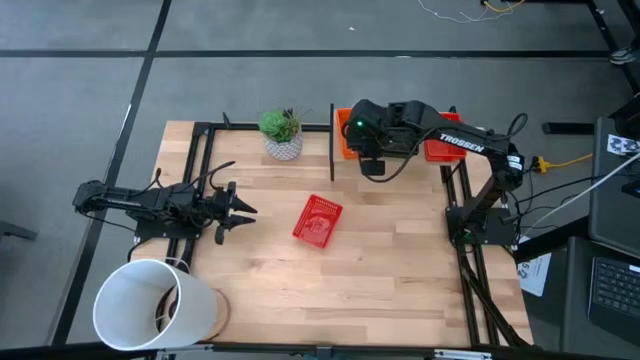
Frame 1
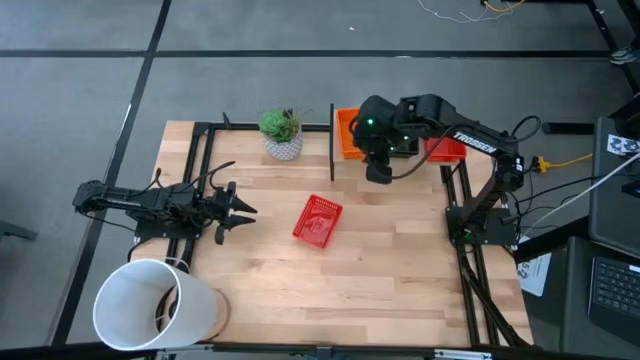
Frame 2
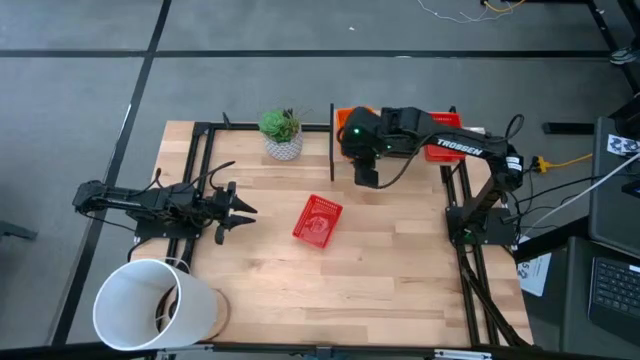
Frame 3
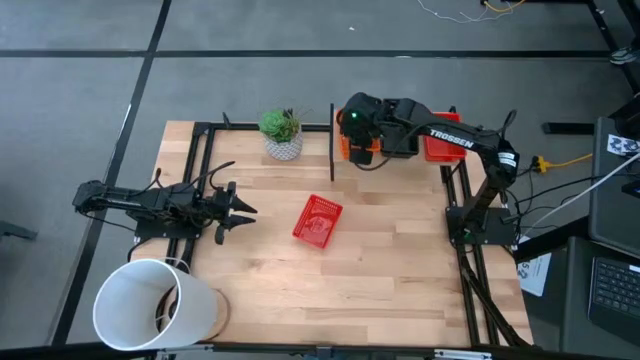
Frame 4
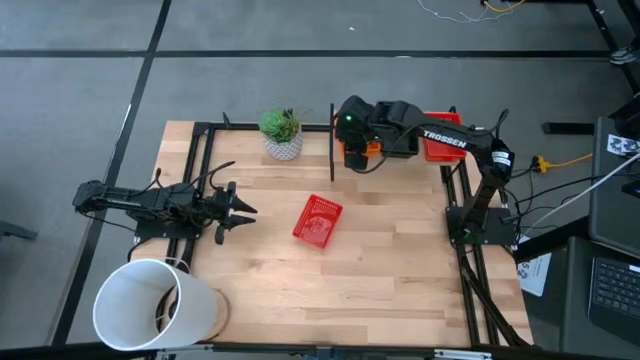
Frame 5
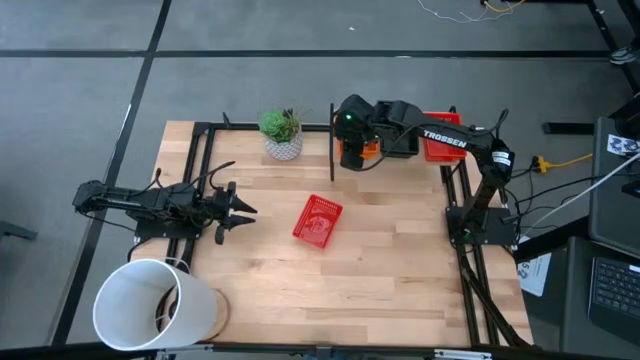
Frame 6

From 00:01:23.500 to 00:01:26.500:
Task: Stack baskets on shelf by color
Adjust the stacked orange bins on the shelf

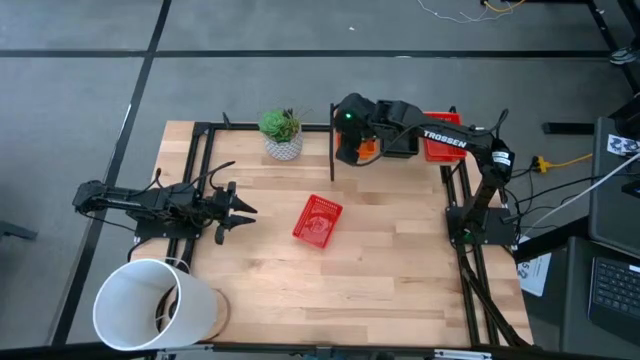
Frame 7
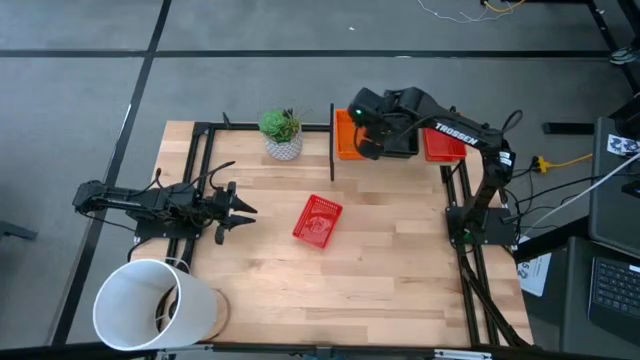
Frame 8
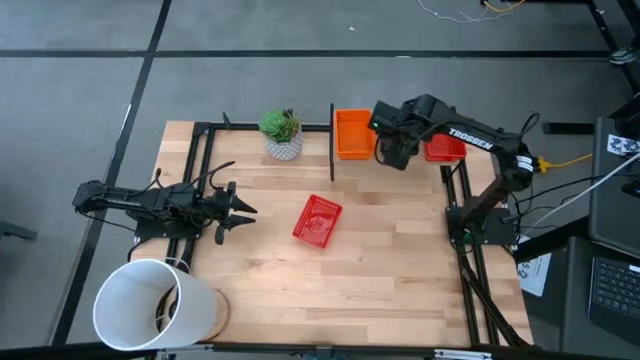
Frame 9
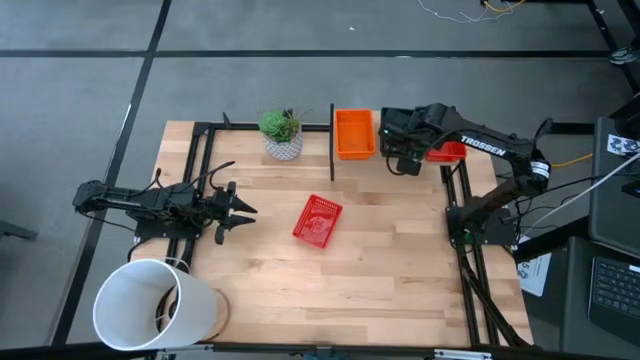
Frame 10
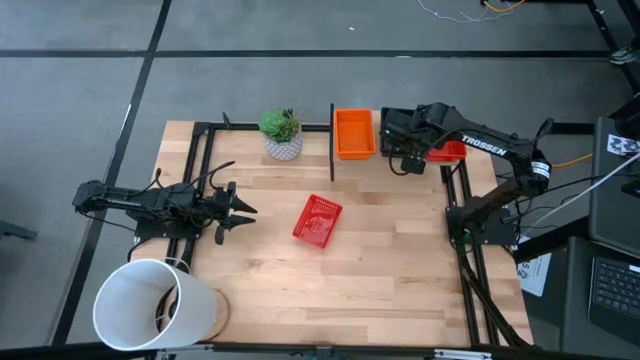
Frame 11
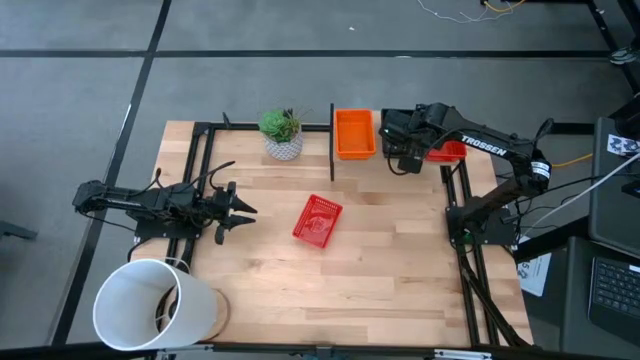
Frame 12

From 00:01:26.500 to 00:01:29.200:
Adjust the stacked black bins on the shelf

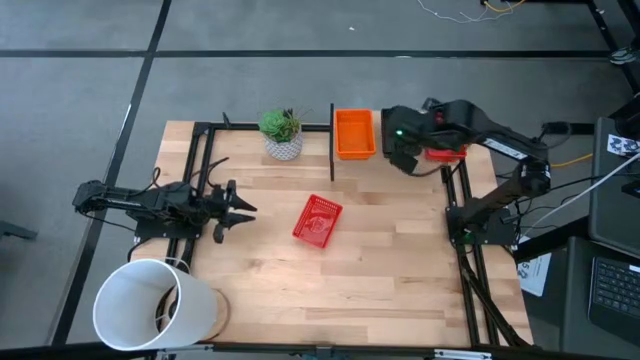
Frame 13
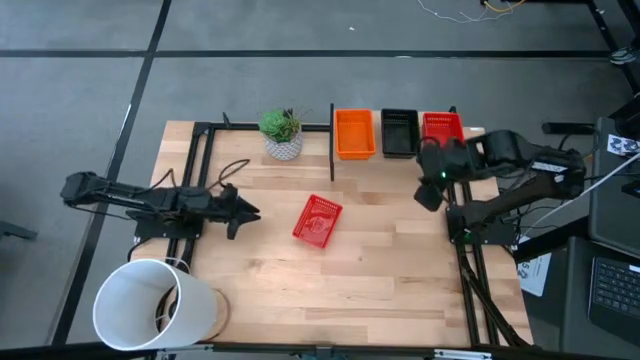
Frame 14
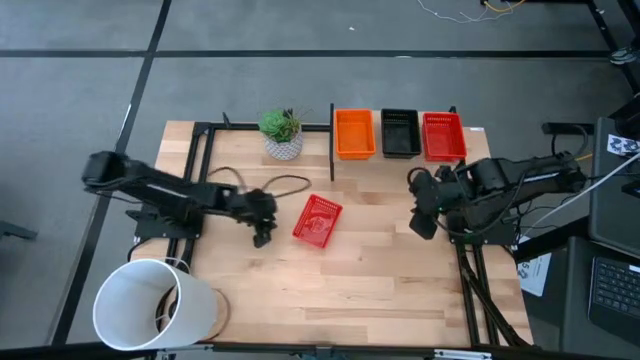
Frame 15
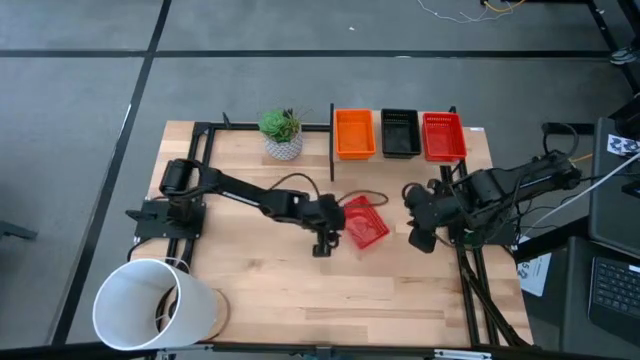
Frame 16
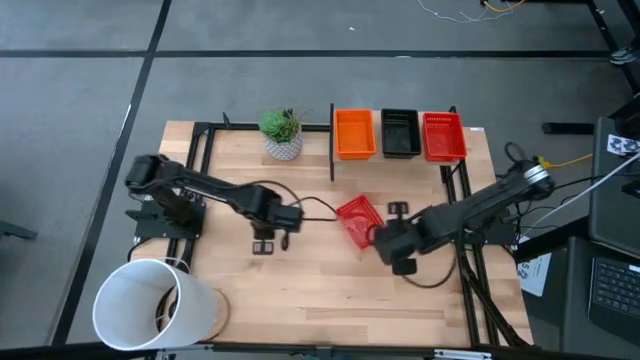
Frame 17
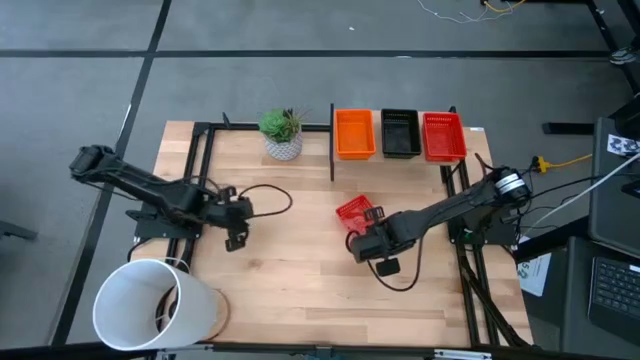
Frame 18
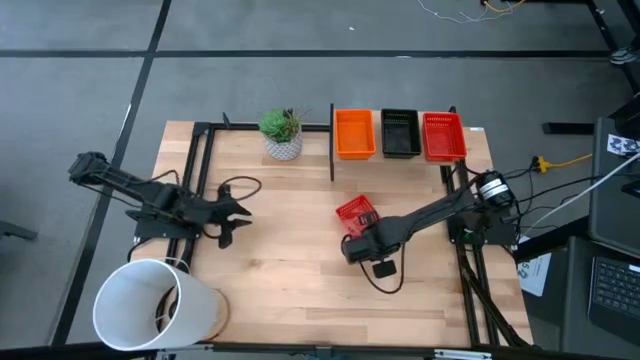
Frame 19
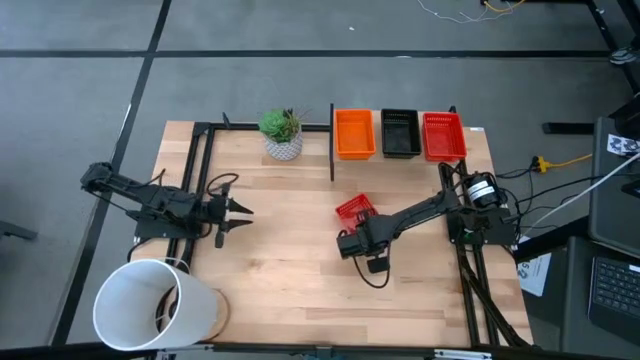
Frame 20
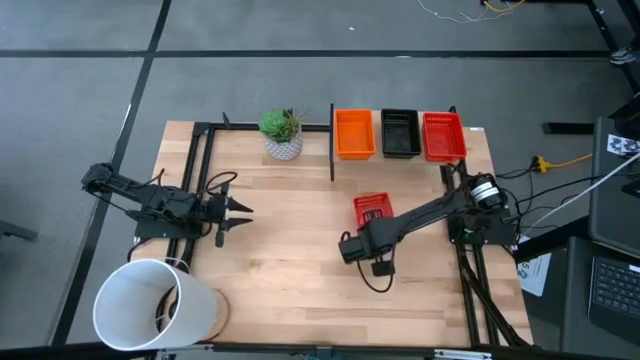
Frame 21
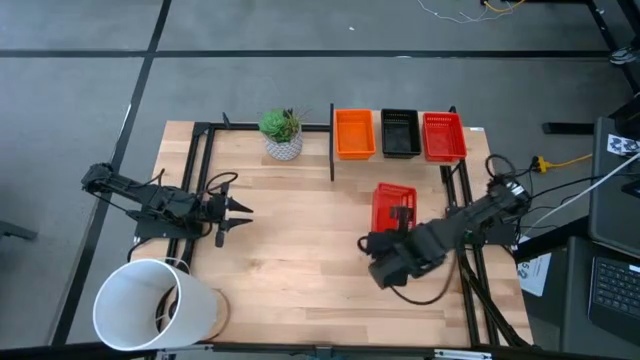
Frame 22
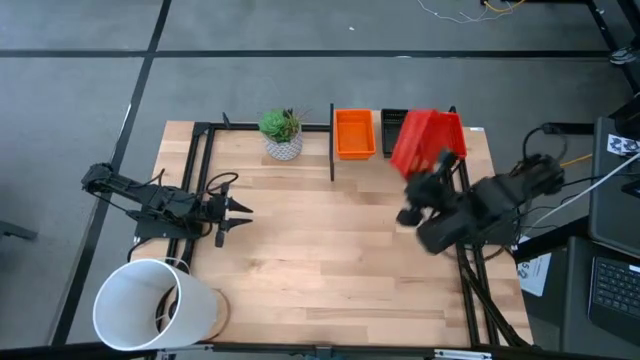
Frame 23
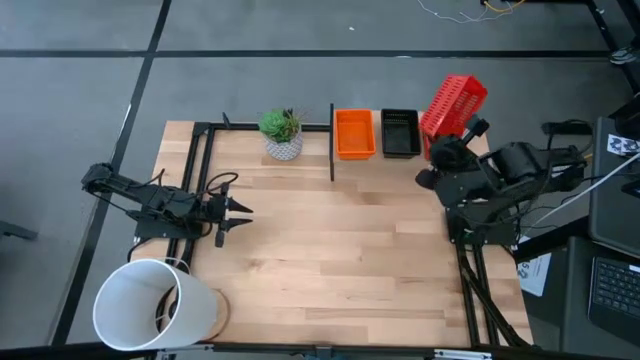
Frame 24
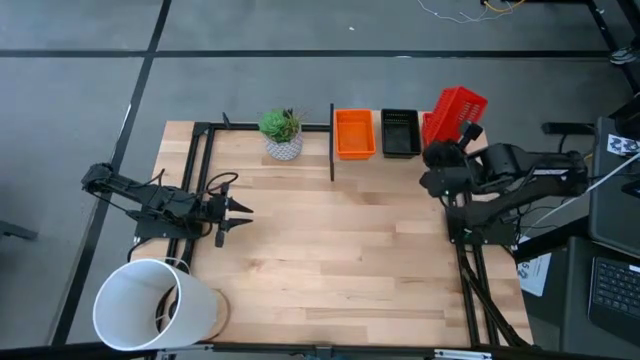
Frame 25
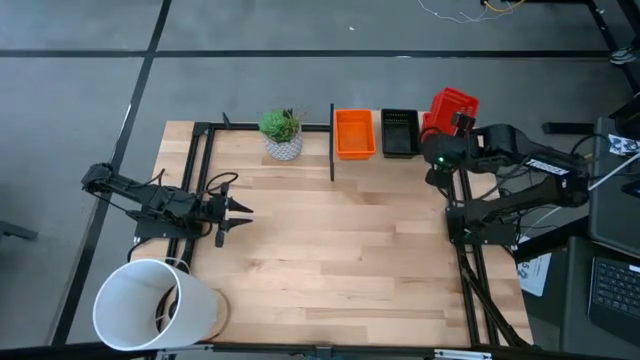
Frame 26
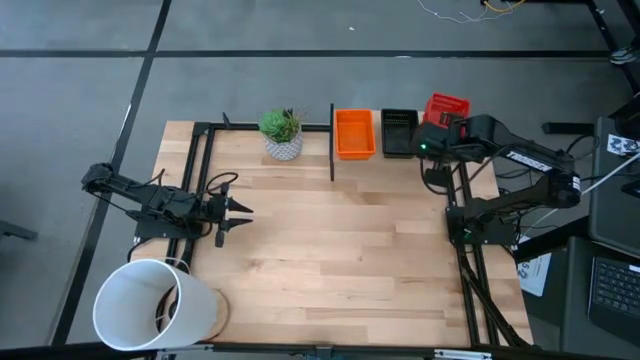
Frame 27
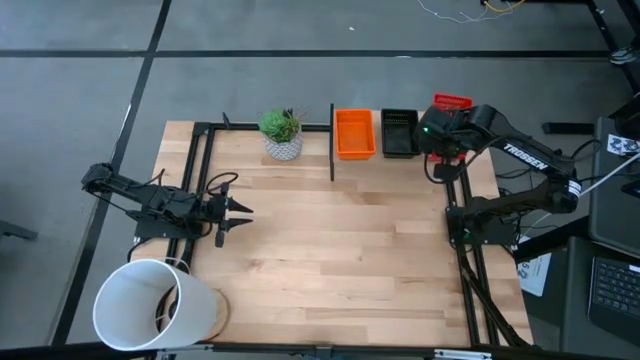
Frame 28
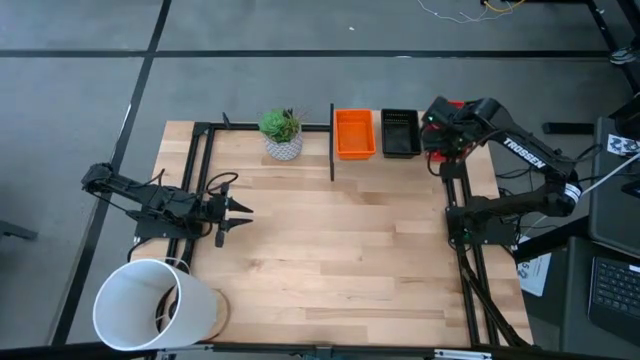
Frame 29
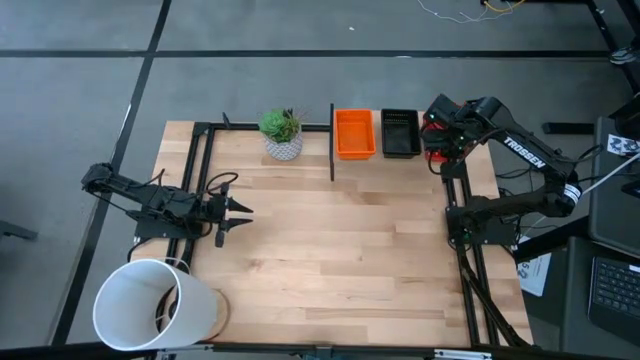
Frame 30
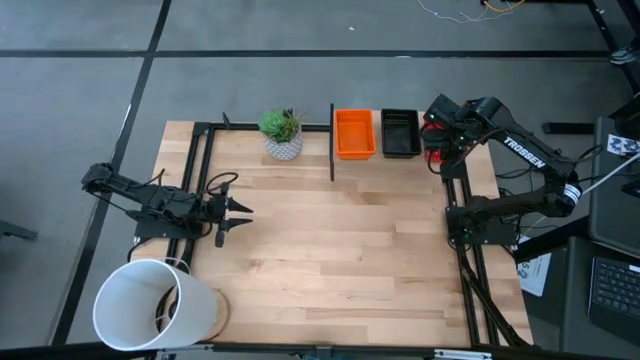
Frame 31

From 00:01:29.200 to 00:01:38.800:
Stack the red bin on top of the stacked red bins on the shelf

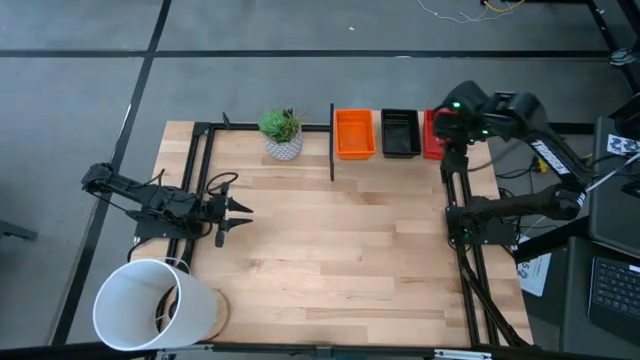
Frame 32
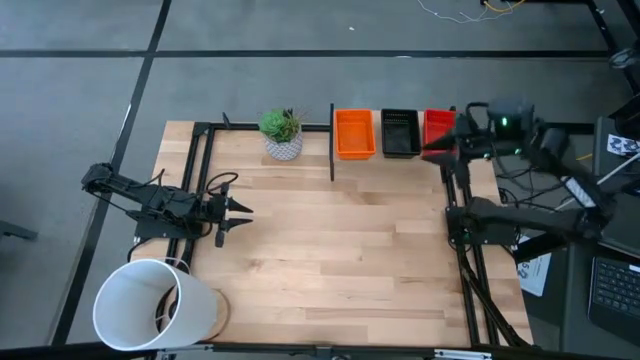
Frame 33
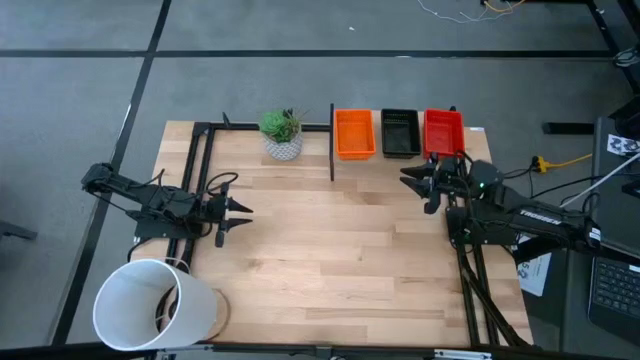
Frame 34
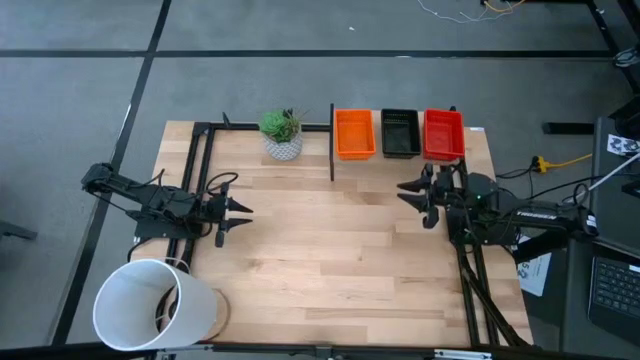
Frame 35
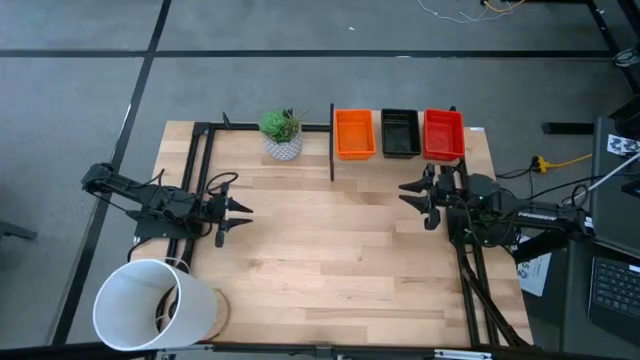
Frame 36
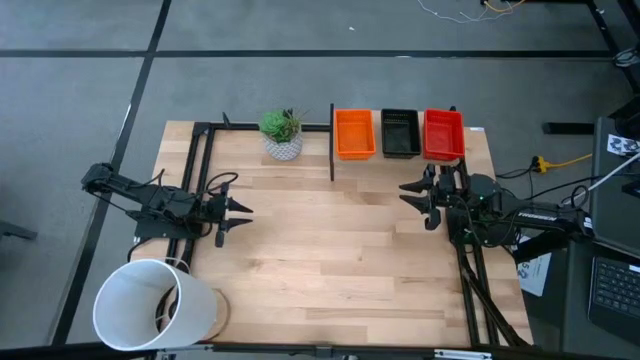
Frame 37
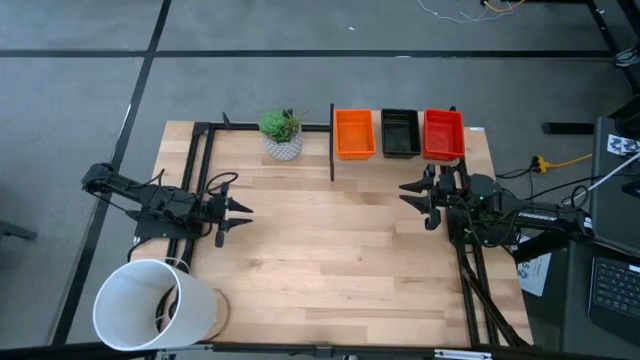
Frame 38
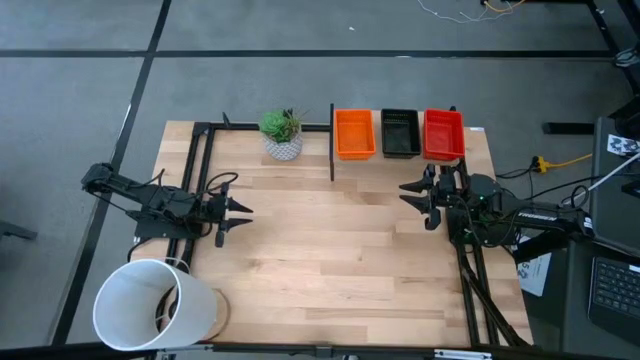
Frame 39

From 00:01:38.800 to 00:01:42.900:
Return to Home Position

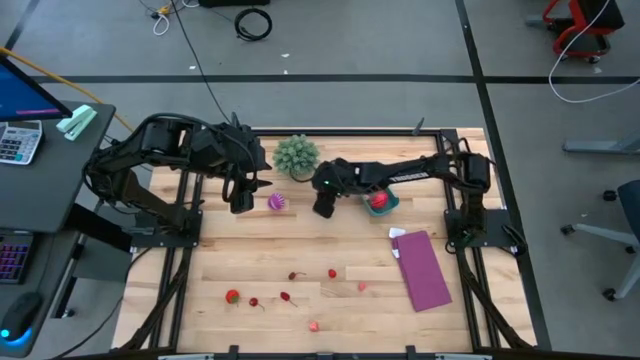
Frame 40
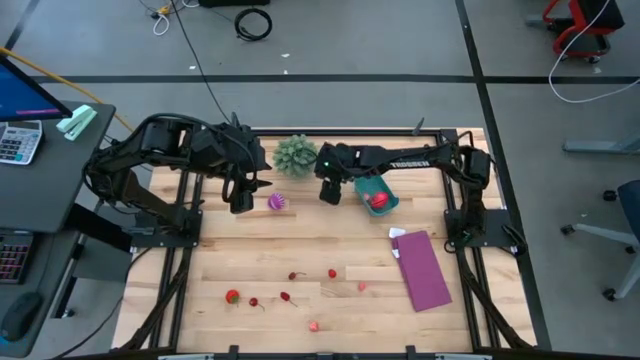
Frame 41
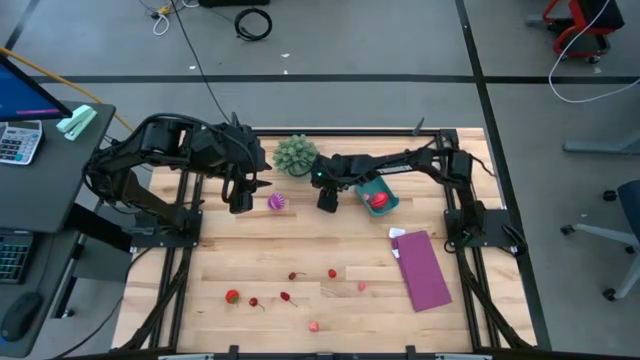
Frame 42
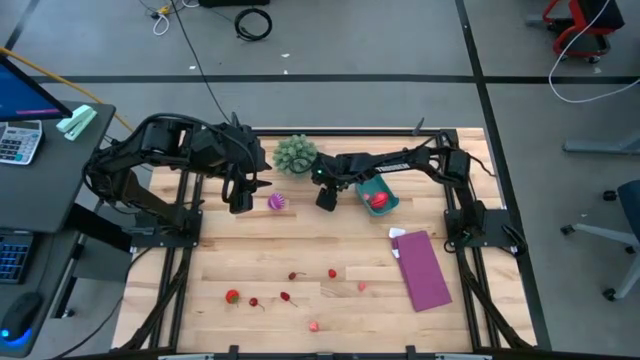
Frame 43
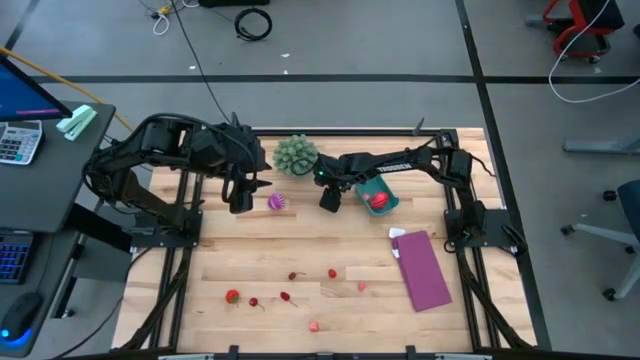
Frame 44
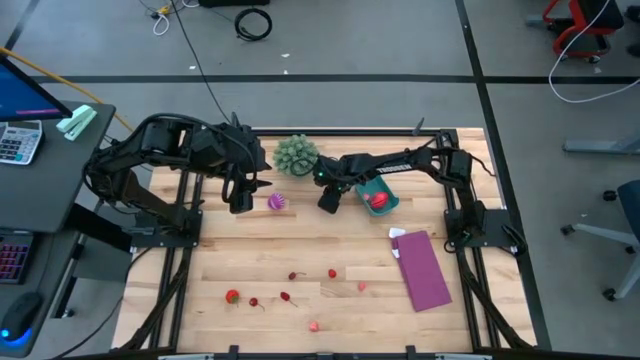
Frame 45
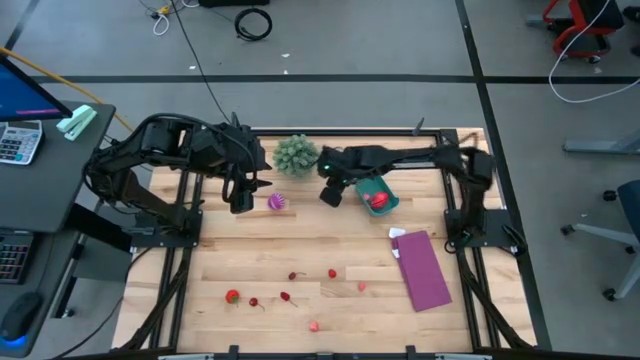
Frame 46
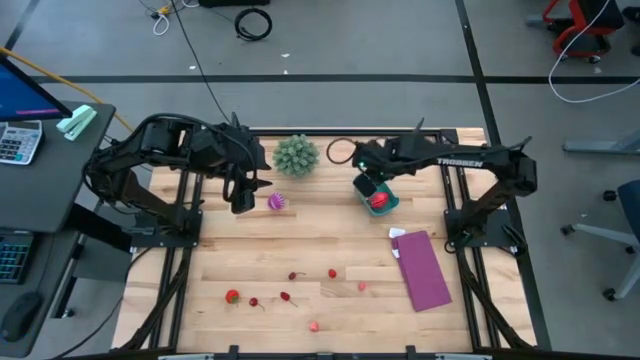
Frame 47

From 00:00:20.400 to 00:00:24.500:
Task: Pick and placing Produce into tupperware
Put the red cherry into the blue bin
